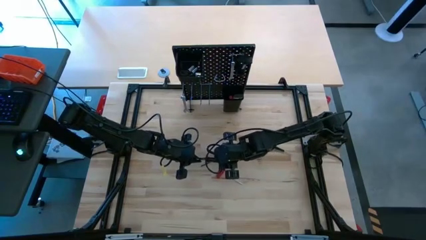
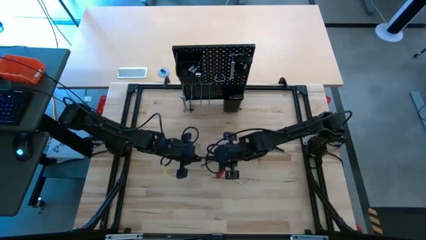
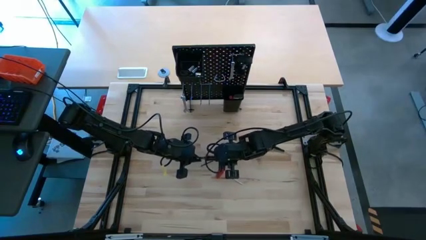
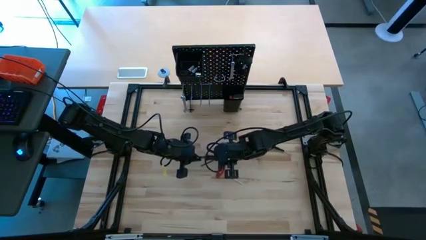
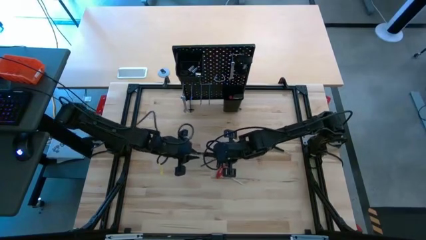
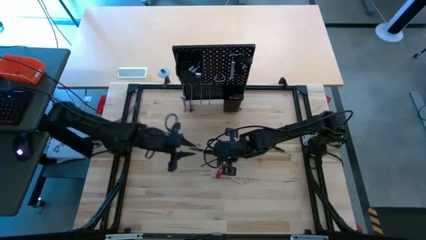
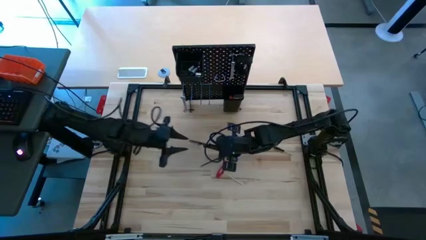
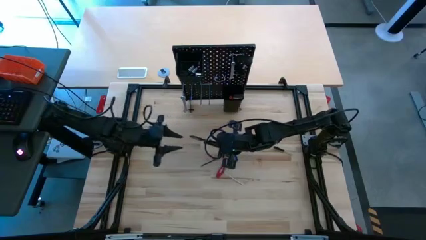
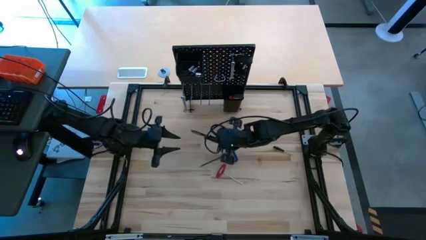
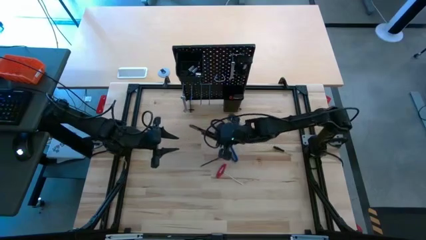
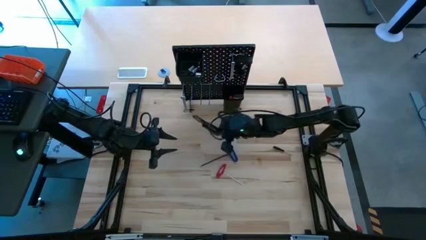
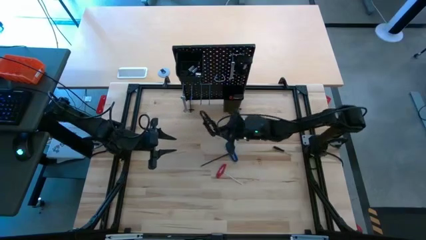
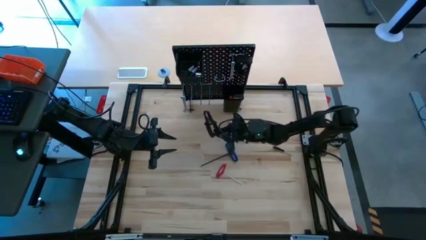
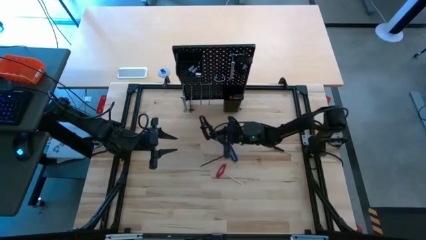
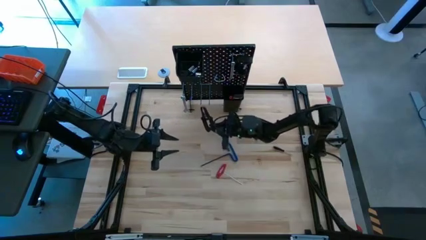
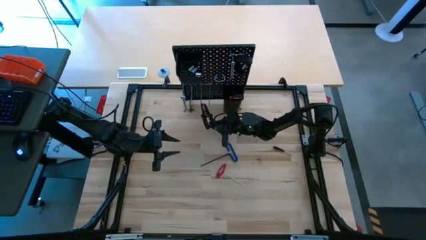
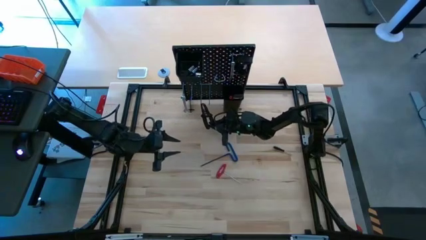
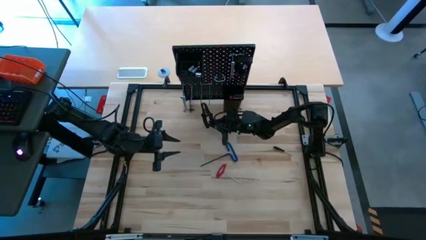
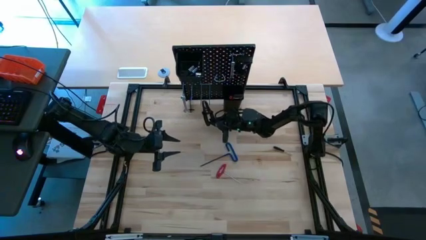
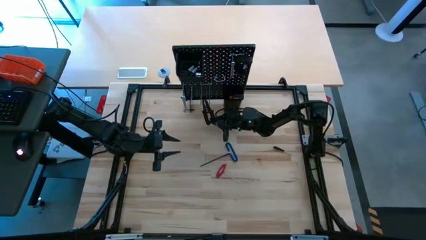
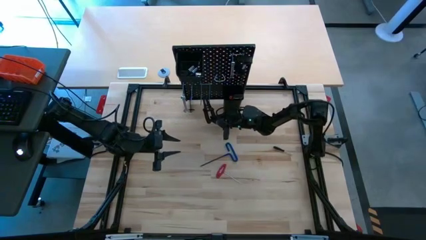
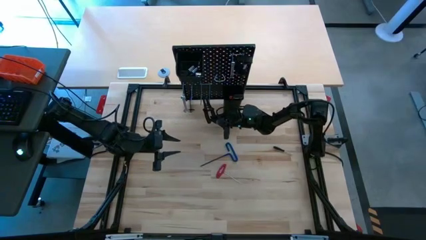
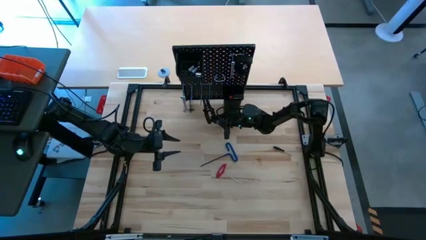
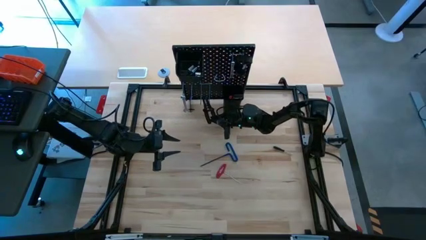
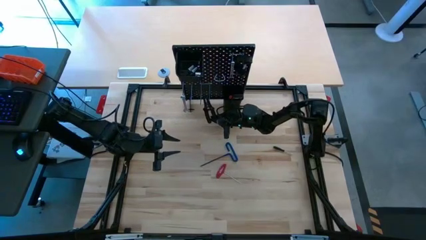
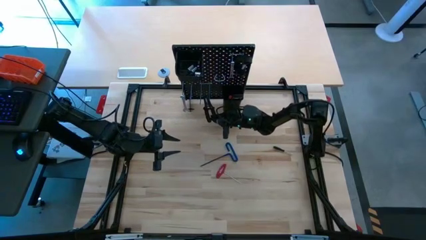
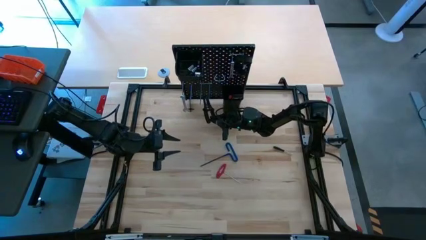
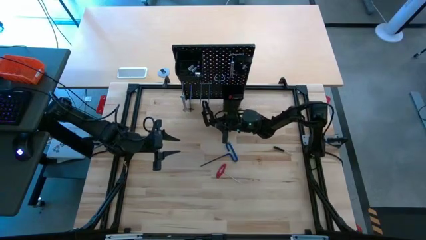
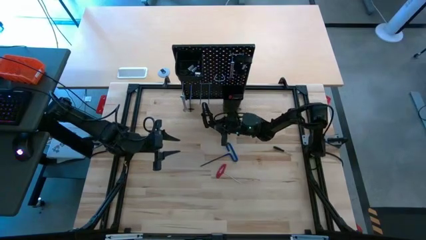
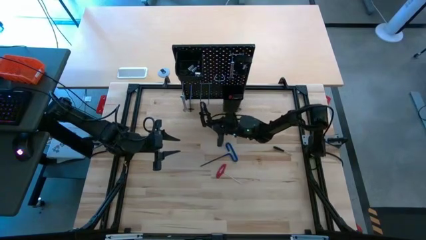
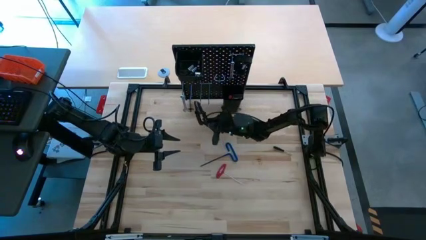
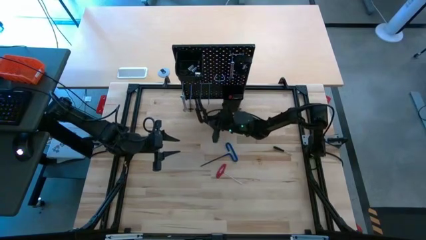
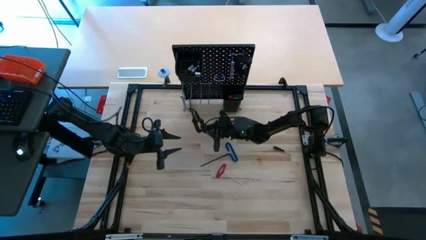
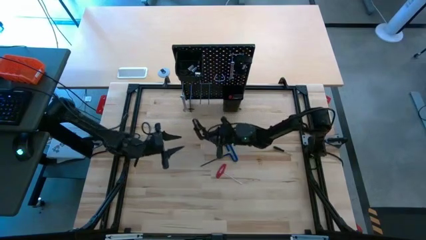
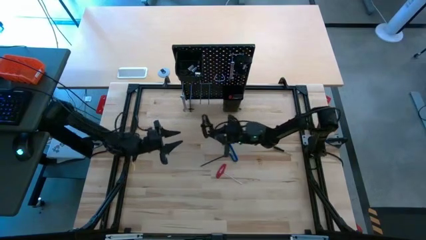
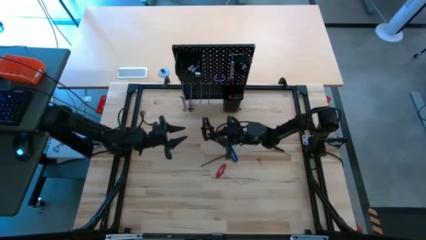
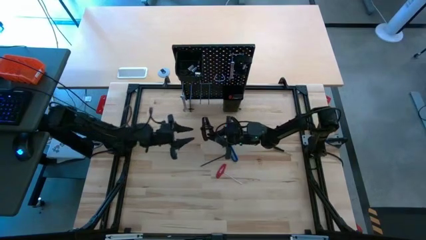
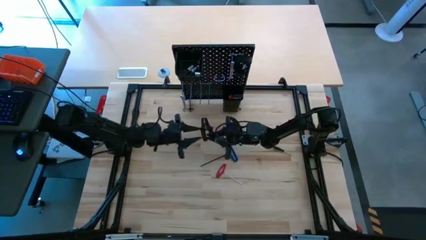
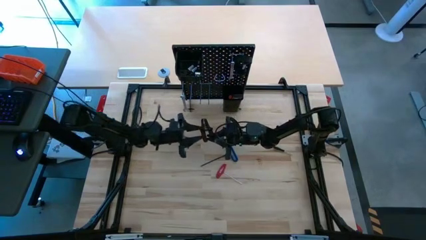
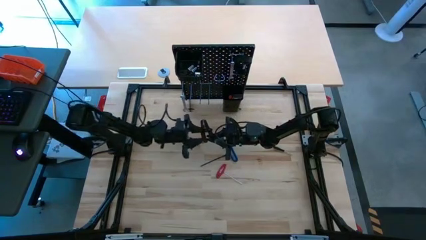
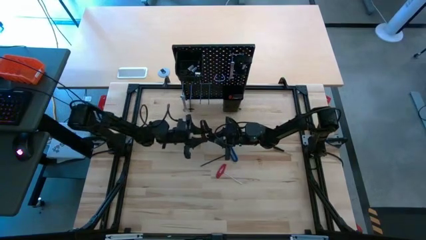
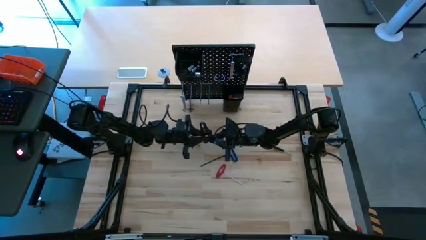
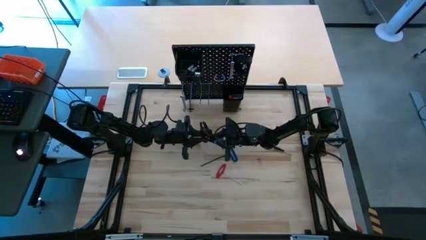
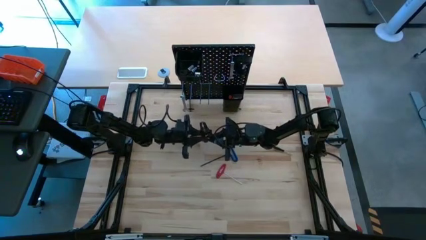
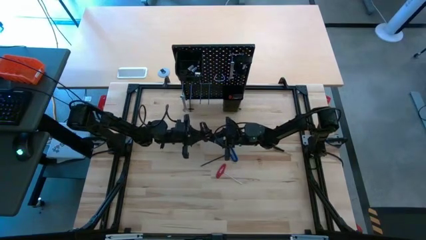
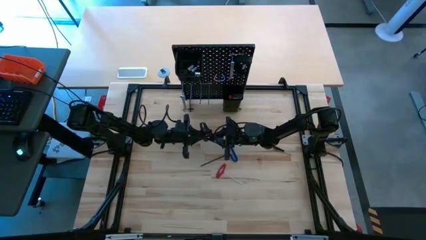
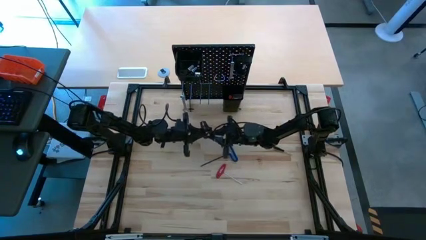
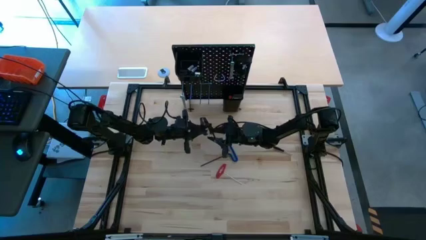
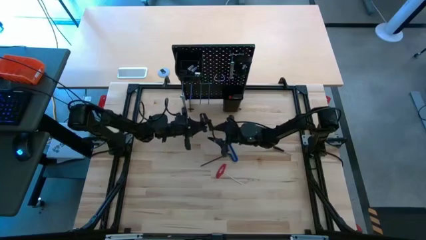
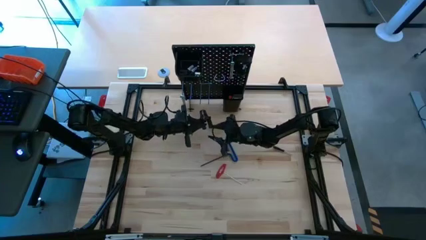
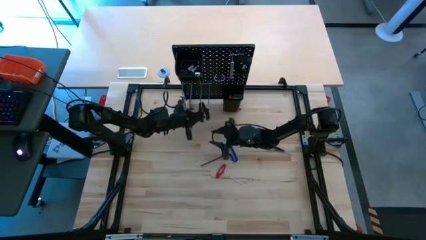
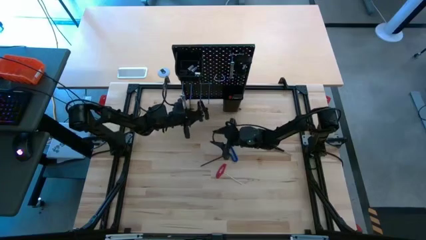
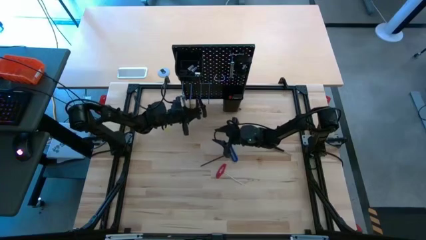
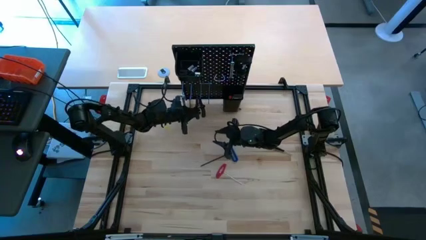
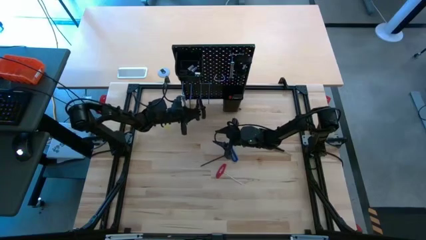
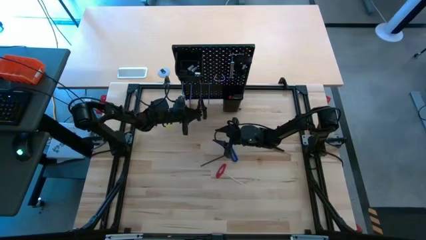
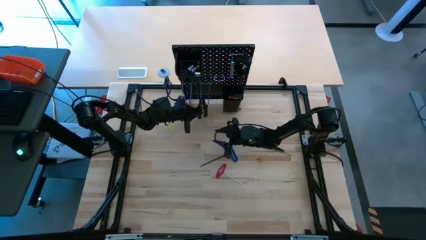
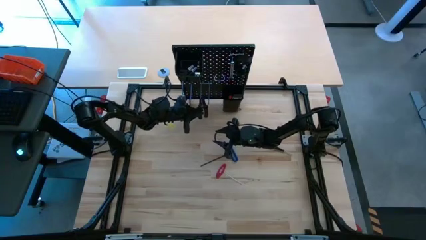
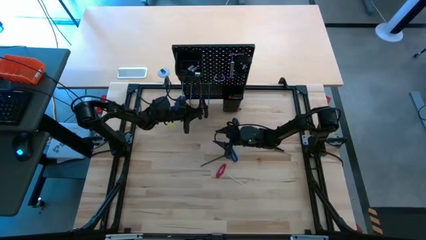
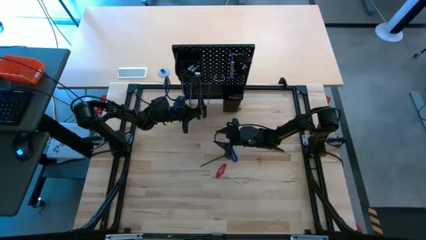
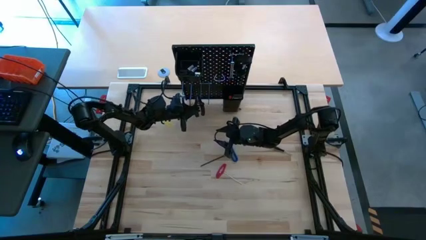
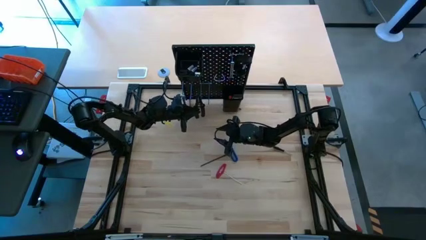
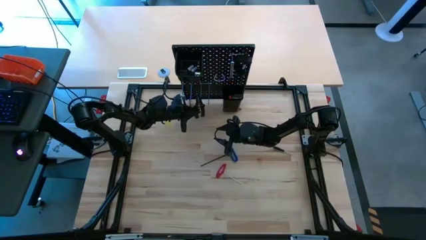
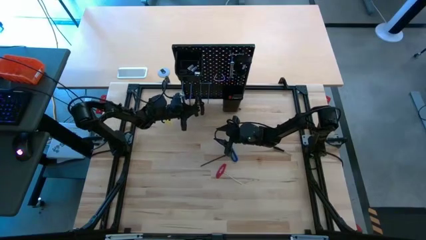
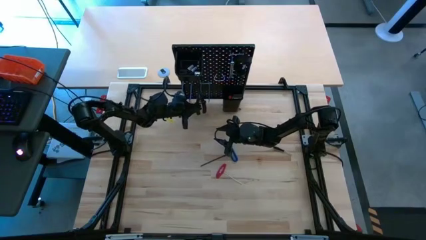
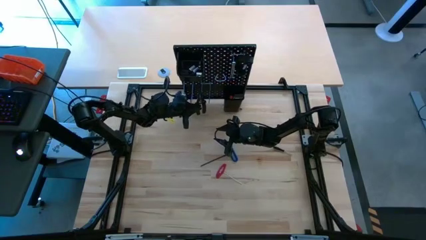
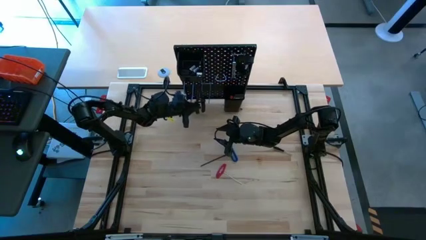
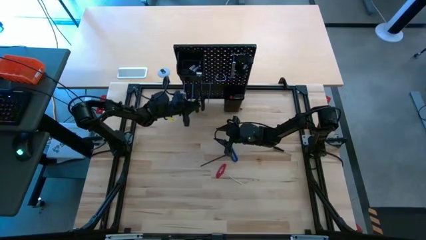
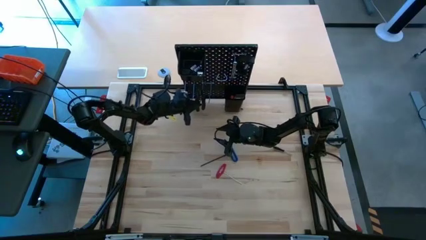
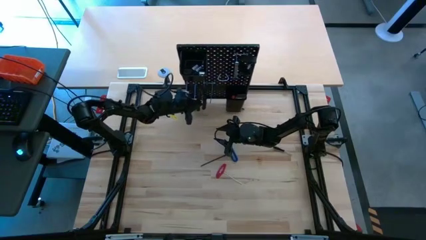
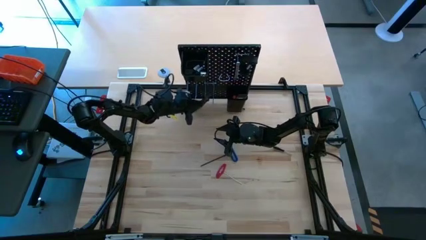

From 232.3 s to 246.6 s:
Task: Hang tools onto peg board
Hang the wire stripper on the pegboard
